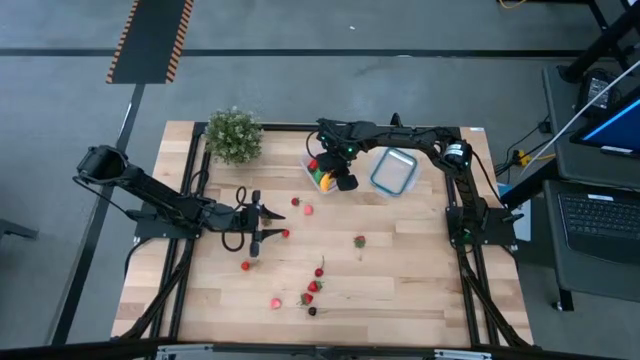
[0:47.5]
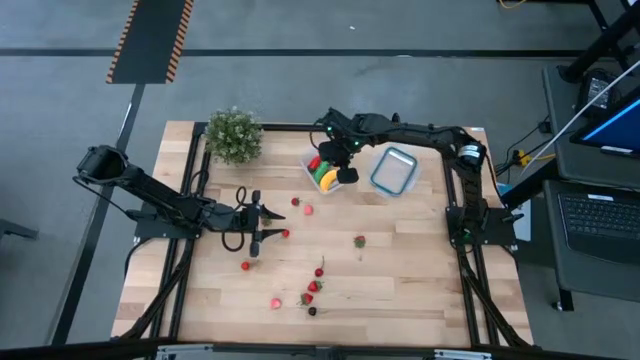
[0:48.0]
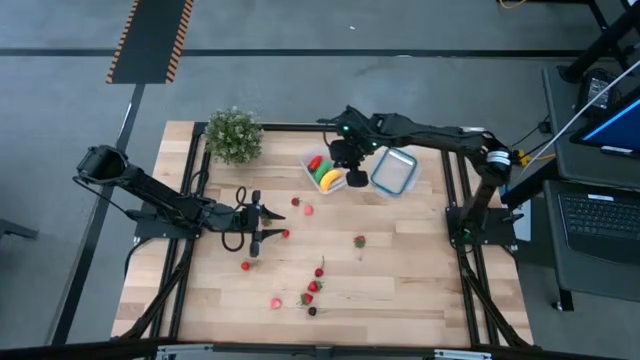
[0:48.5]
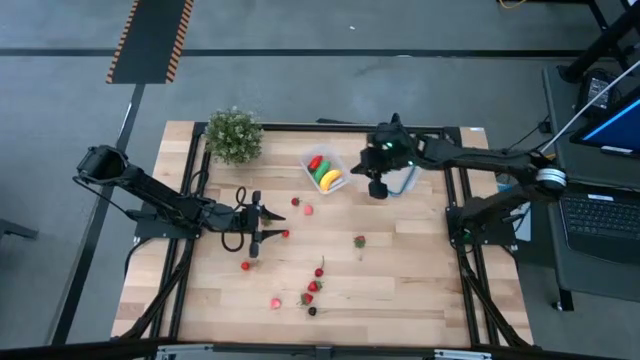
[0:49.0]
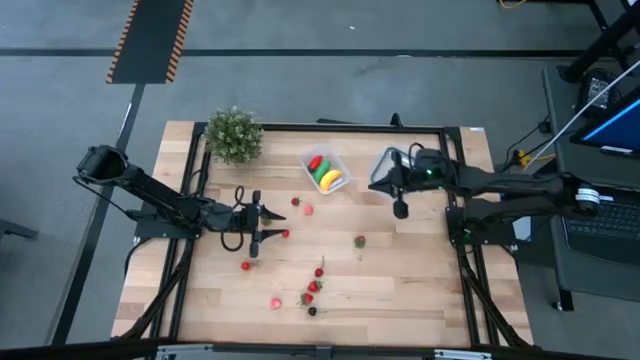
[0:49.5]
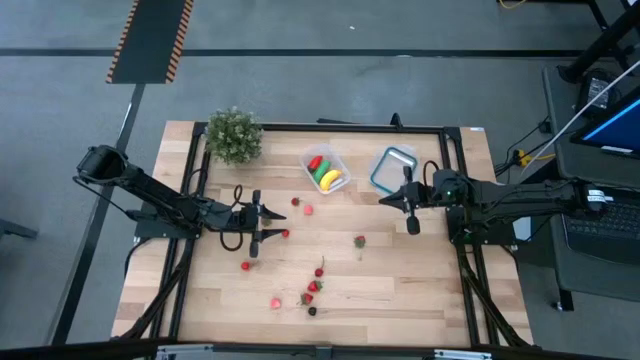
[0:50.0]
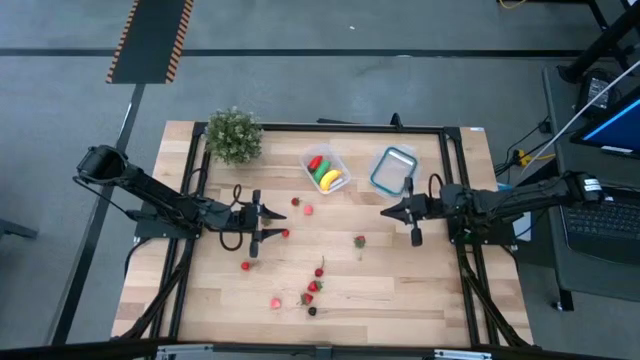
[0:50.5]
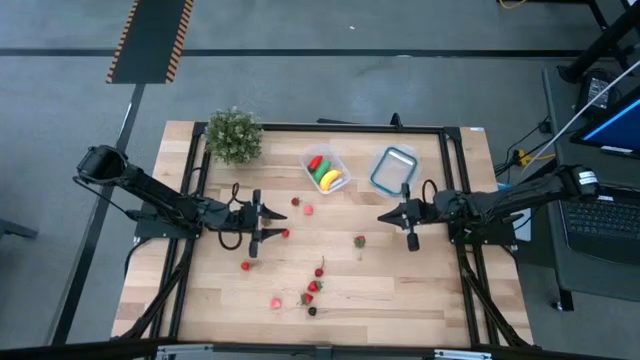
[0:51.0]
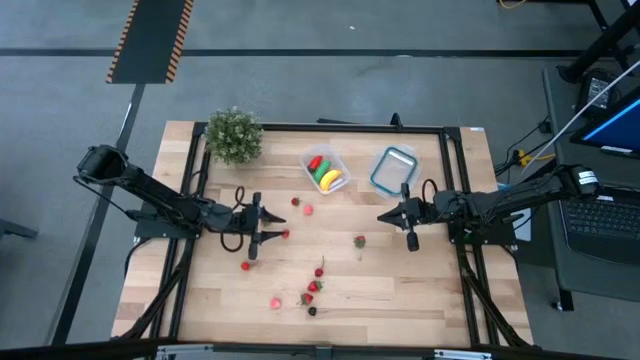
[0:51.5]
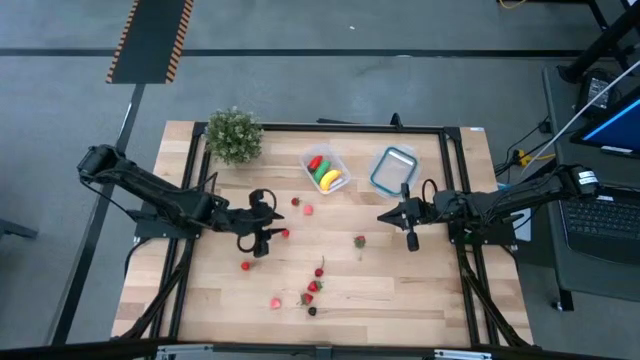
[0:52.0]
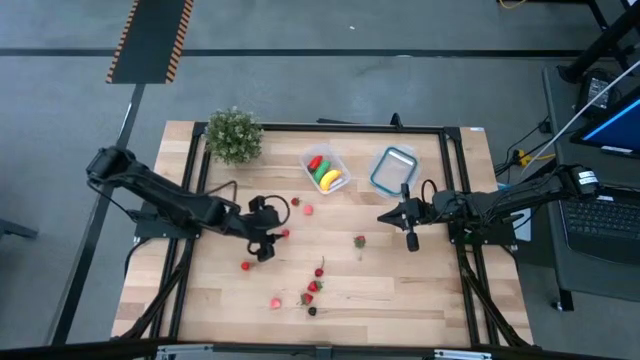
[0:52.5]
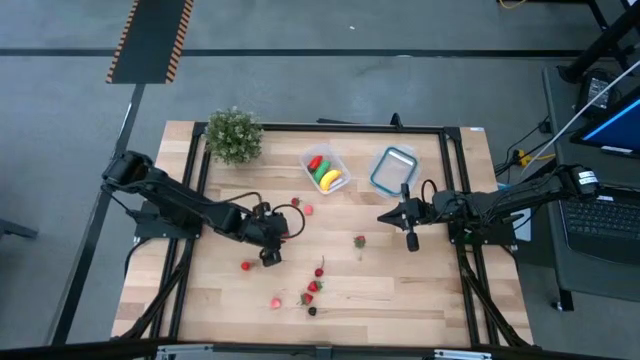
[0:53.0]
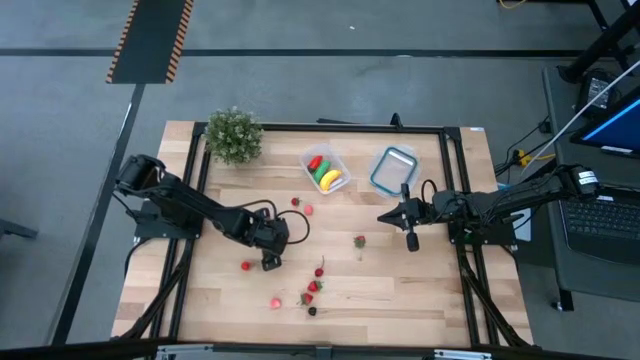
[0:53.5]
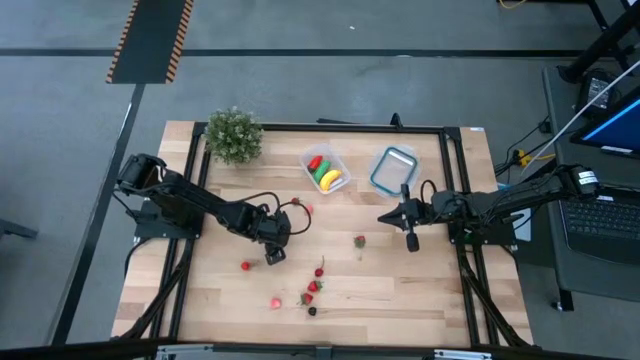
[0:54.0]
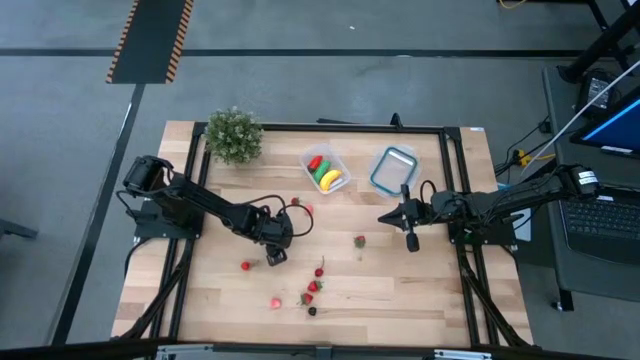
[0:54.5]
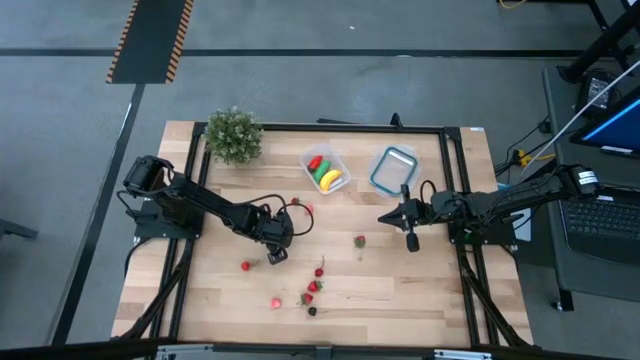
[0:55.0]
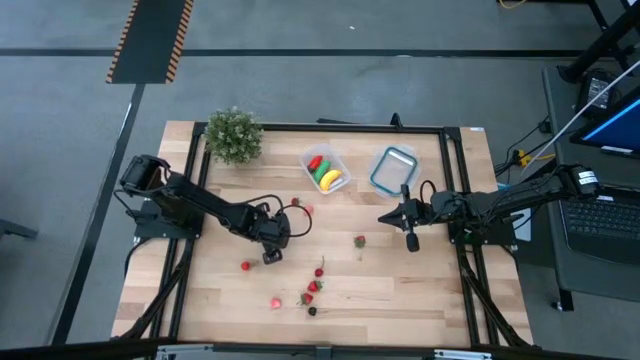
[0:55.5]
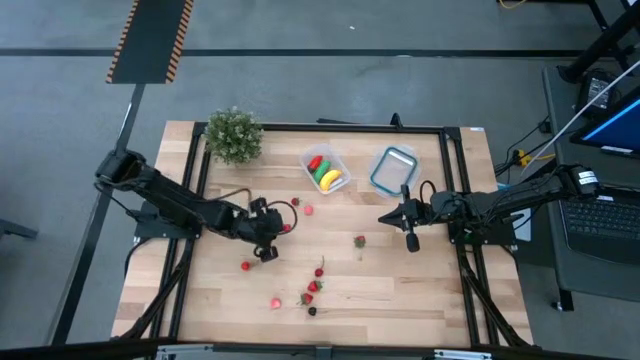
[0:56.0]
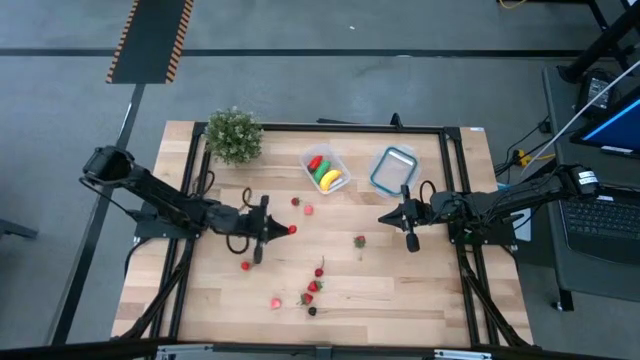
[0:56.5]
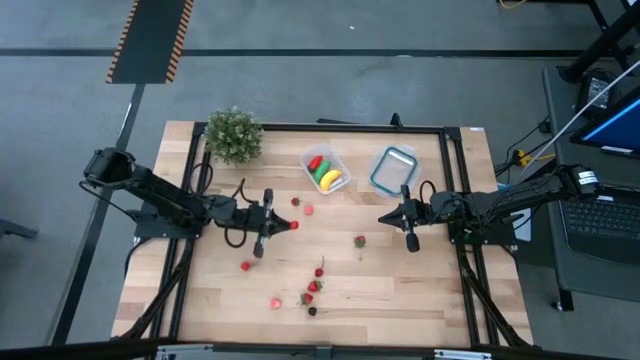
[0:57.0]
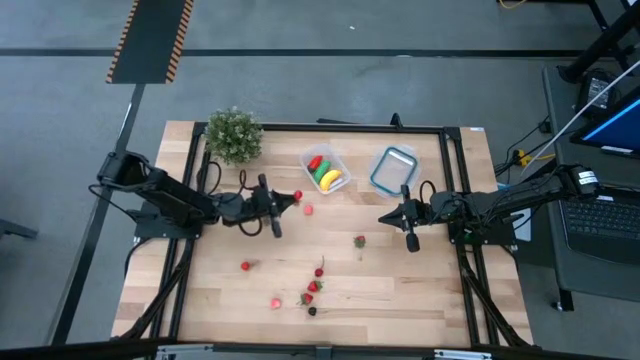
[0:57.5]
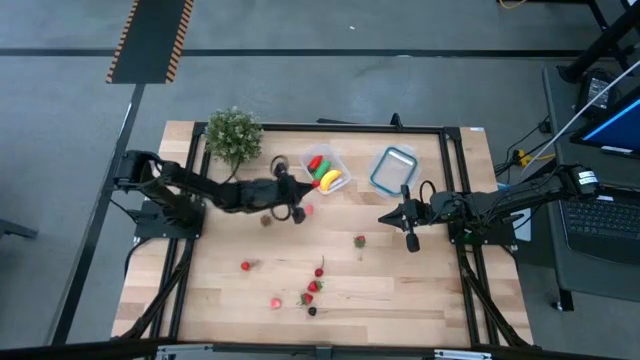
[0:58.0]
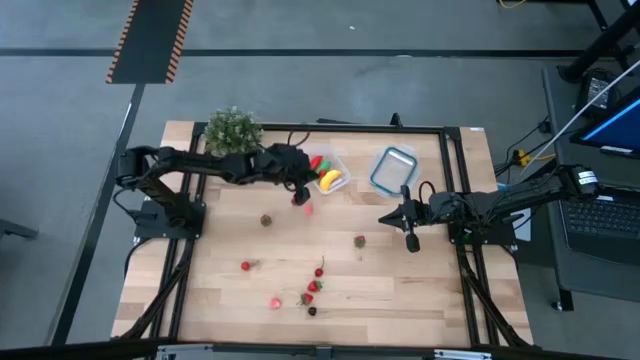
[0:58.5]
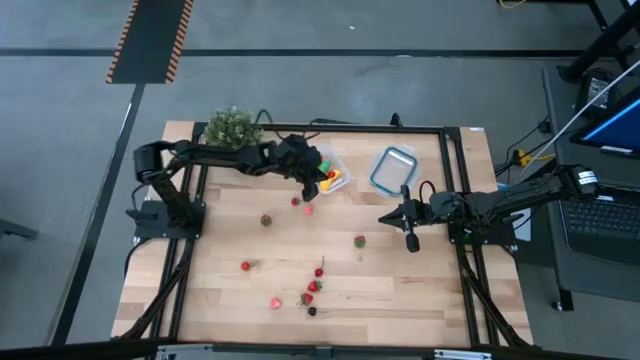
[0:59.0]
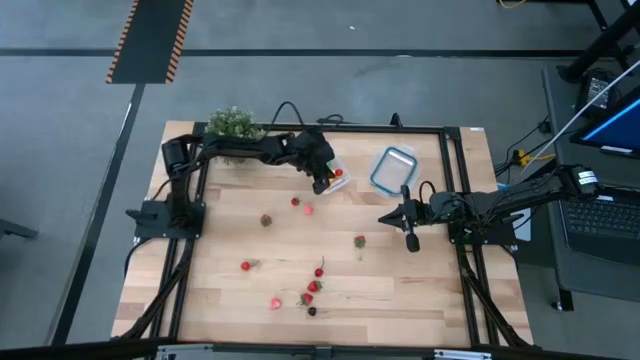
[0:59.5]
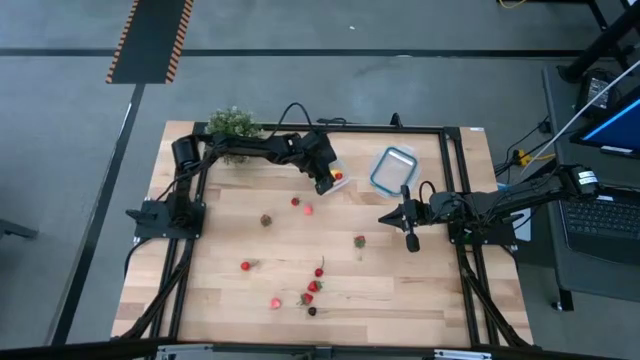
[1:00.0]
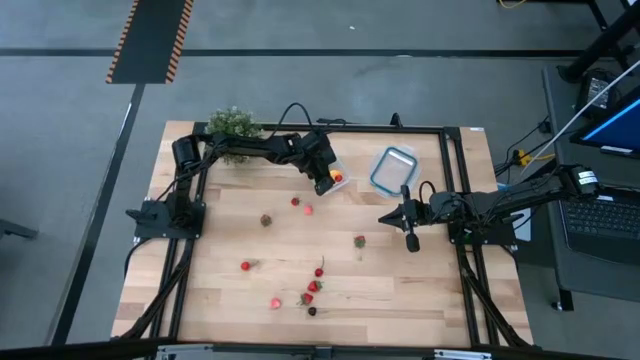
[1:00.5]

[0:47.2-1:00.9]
Task: Pick and placing Produce into tupperware
Put the top red cherry into the transparent container

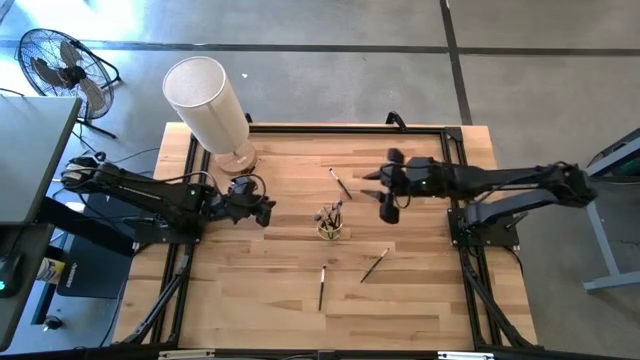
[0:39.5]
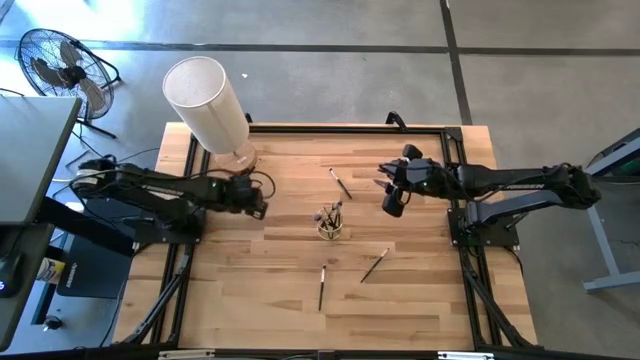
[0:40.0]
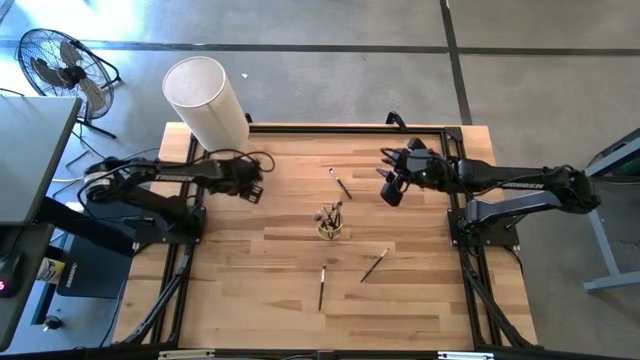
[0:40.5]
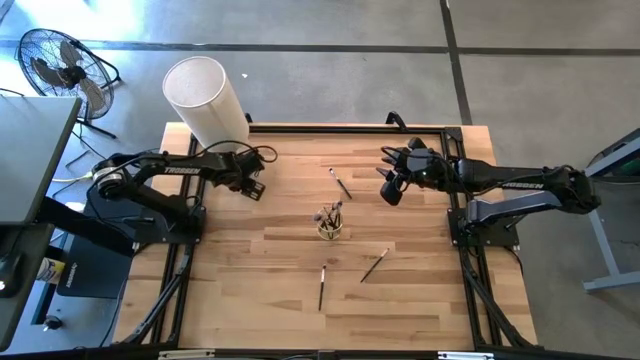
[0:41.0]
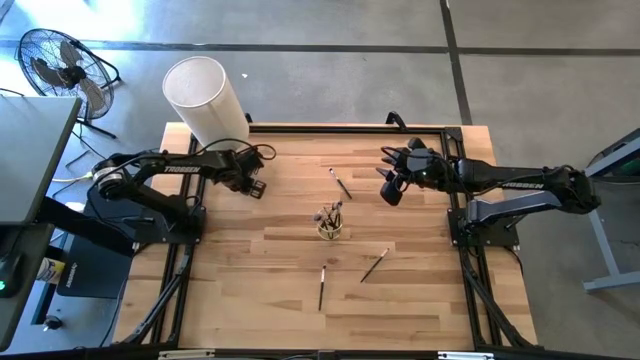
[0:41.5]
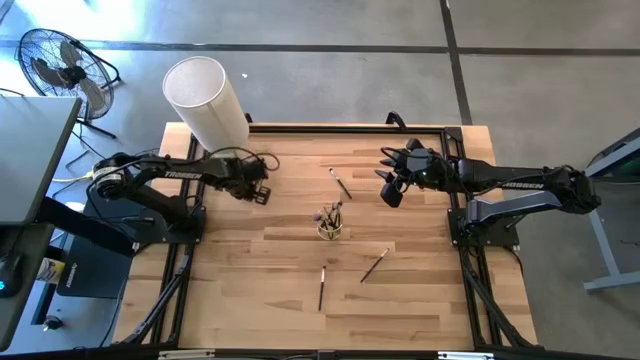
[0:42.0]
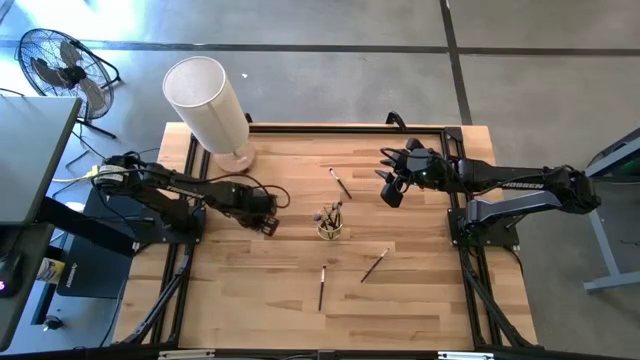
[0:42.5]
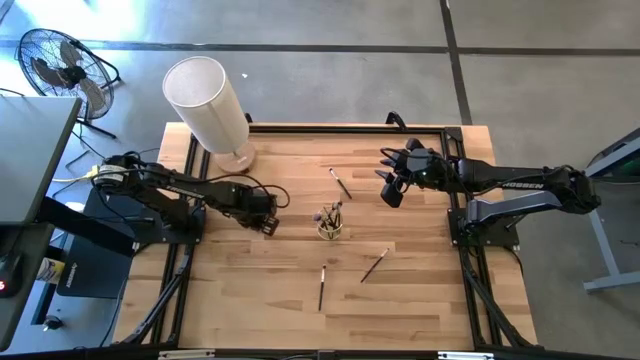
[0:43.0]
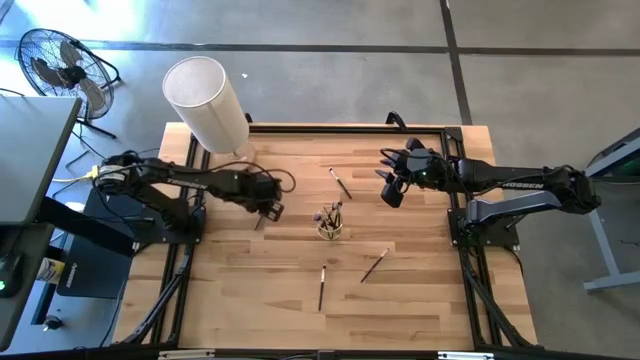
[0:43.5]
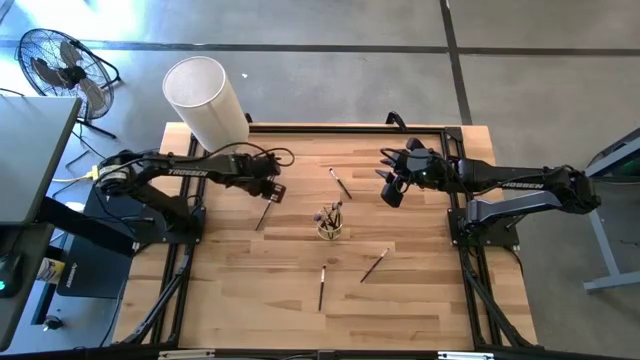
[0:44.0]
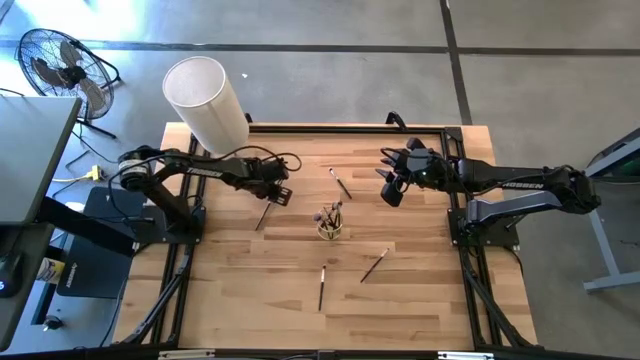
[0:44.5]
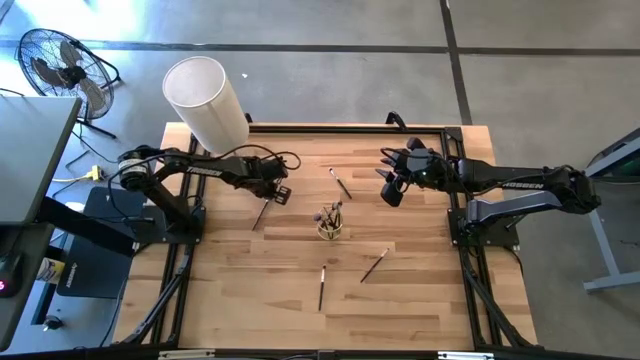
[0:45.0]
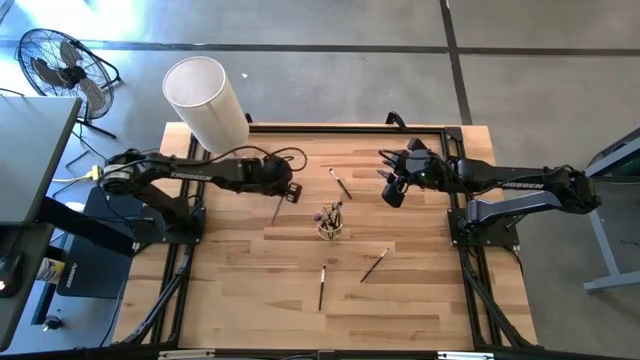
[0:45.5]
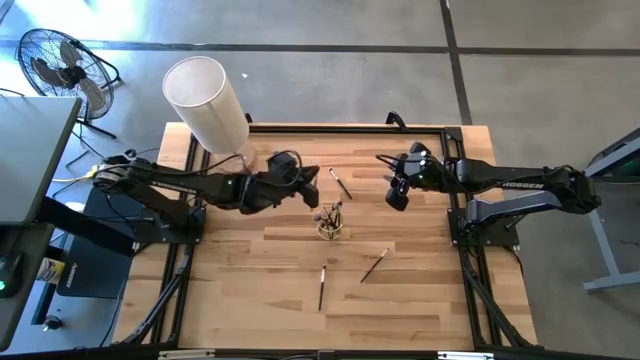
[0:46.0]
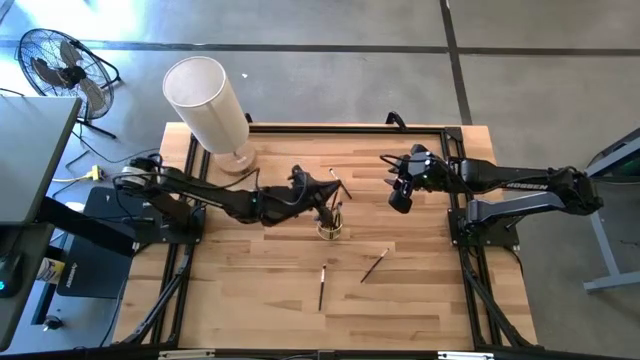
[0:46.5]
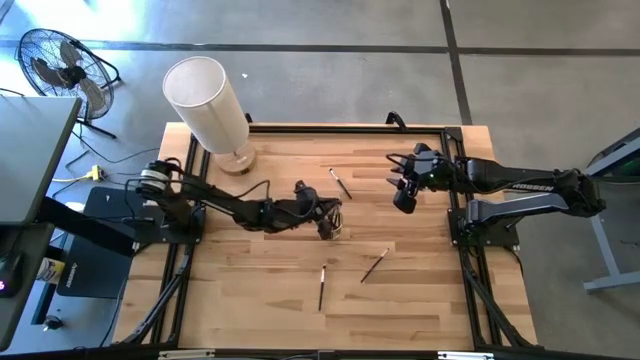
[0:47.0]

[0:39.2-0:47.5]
Task: Put items in baskets/containers
Put the eyeshadow brush into the wire organizer
